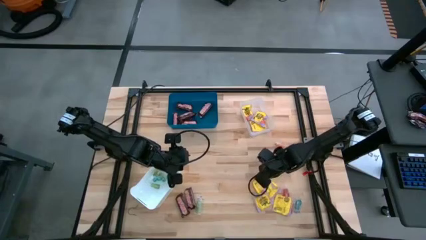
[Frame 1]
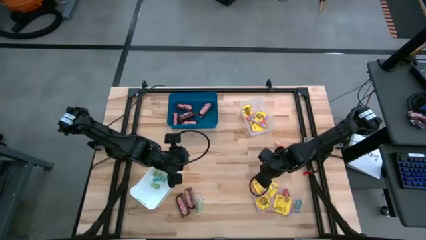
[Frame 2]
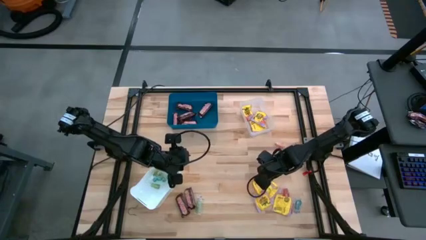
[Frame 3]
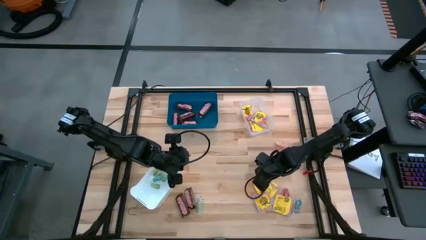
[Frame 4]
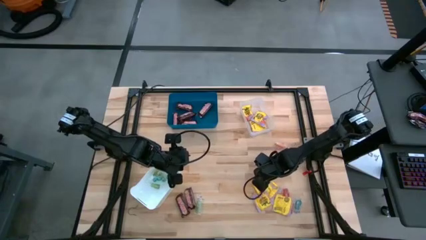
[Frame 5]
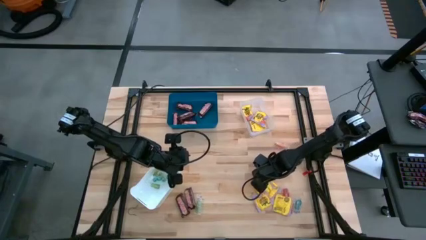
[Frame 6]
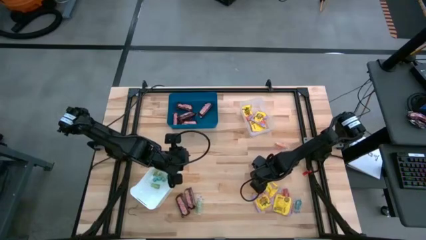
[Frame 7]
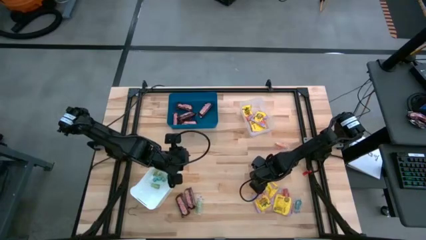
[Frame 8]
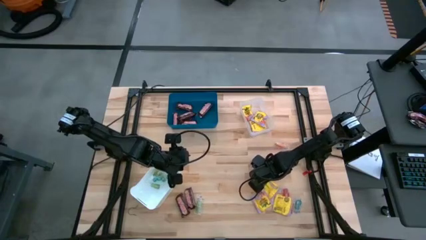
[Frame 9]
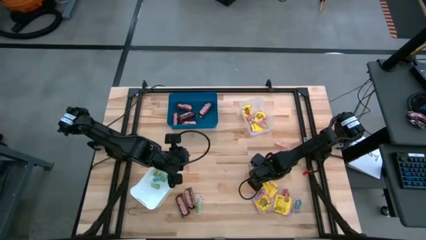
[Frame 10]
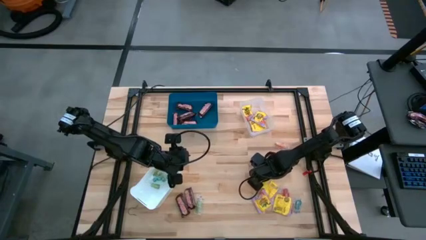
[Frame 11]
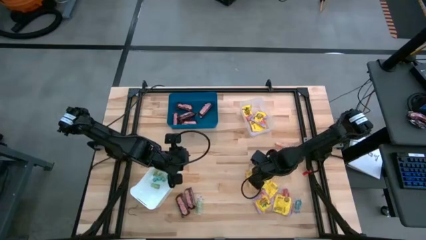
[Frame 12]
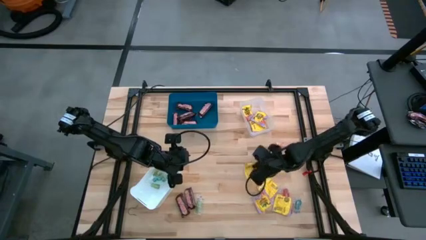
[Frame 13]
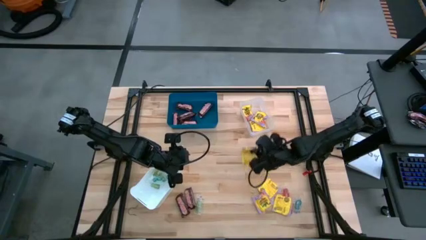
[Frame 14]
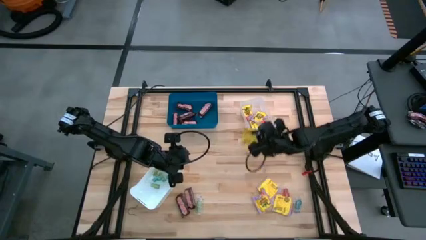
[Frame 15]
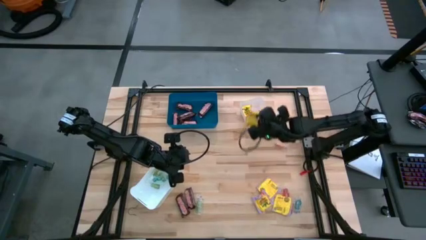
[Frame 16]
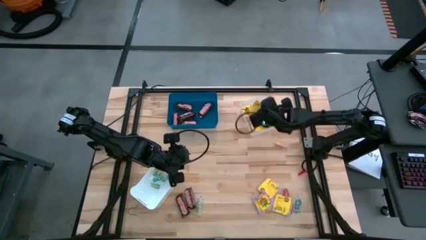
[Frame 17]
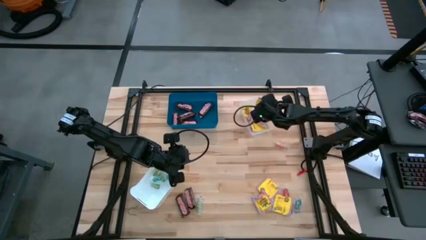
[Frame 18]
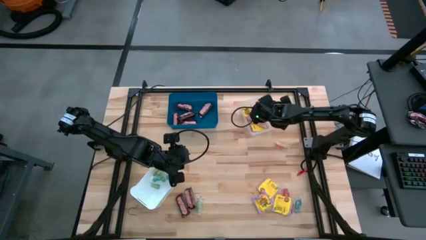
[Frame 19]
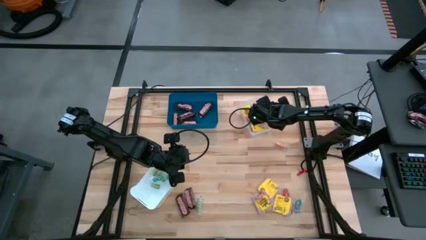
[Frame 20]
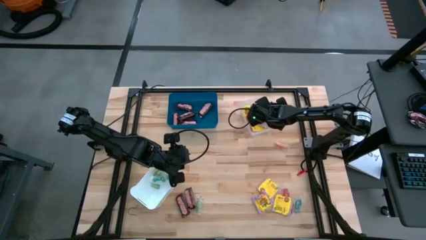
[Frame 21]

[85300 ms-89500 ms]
Task: Sort candy
Put the yellow candy into the transparent bin

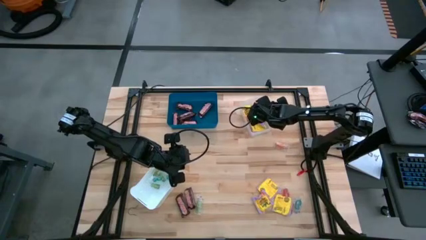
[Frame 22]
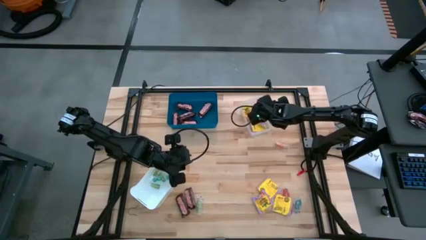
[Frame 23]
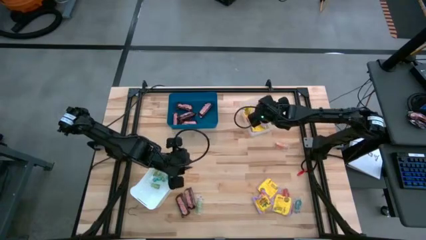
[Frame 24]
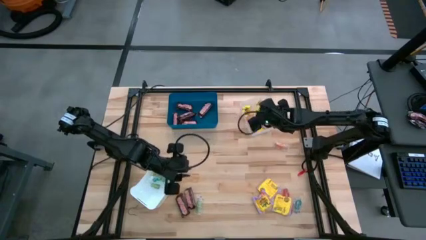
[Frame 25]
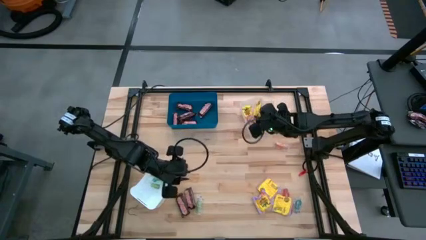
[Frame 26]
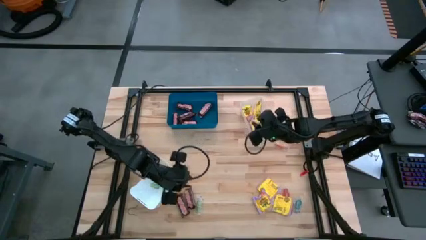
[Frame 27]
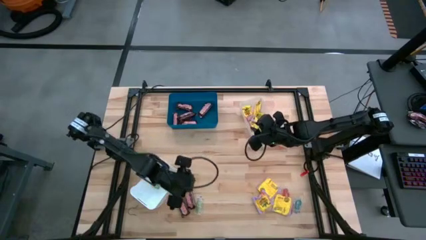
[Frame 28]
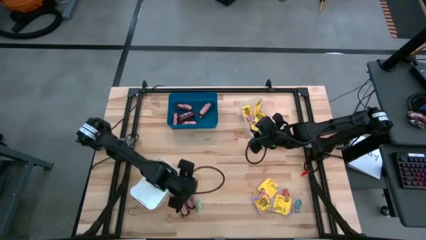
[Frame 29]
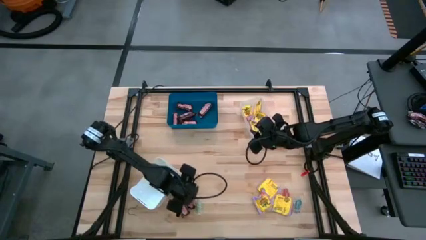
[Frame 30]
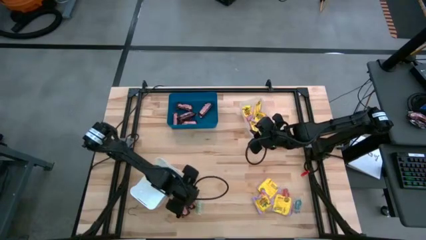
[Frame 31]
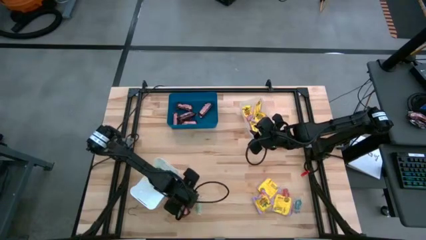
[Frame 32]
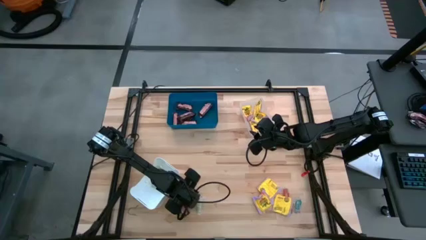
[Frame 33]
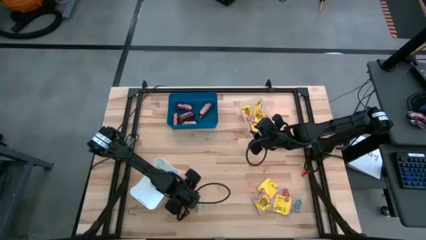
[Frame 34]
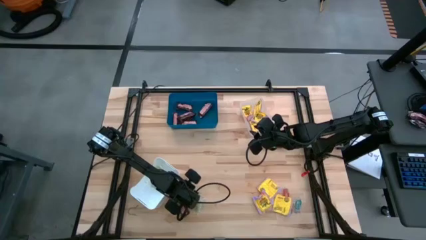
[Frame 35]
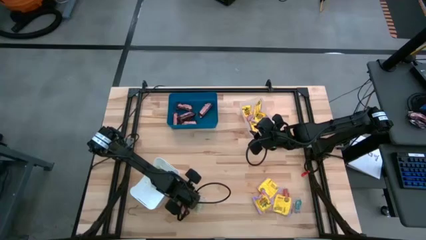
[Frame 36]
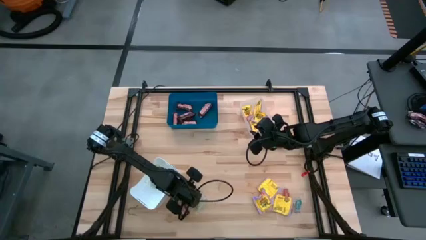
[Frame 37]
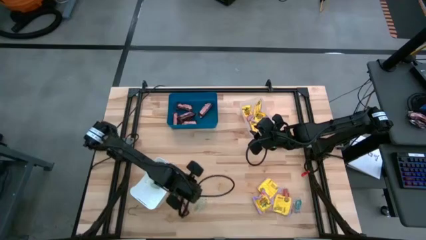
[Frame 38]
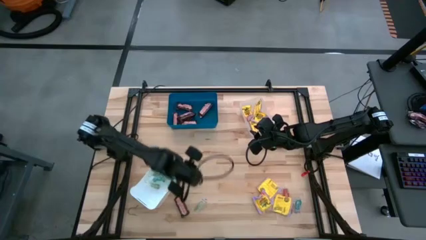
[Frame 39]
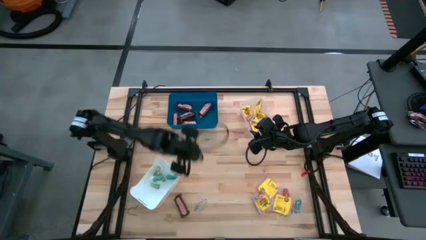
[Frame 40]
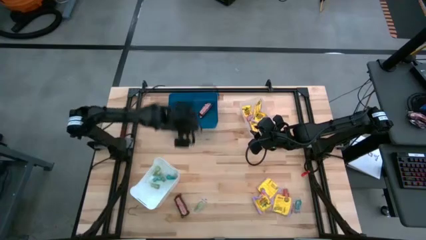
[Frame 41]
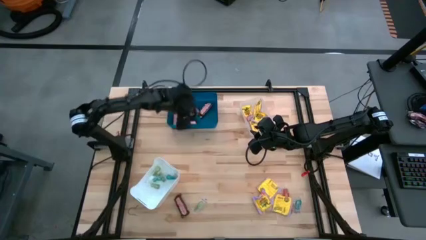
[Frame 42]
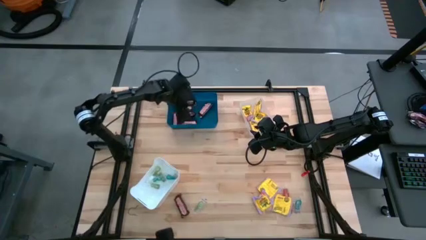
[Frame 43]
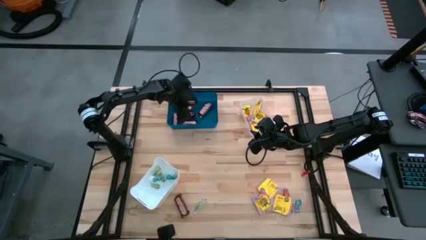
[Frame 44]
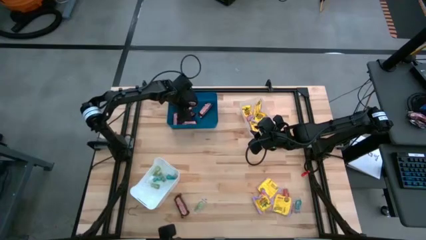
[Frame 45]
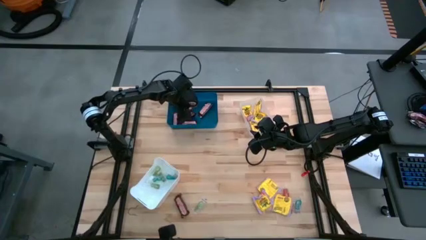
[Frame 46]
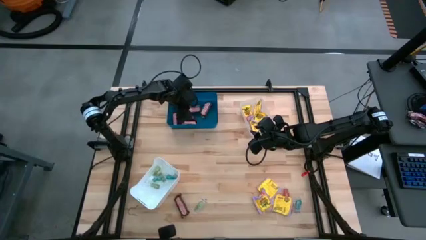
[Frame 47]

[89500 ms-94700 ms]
Put the brown chocolate into the blue bin

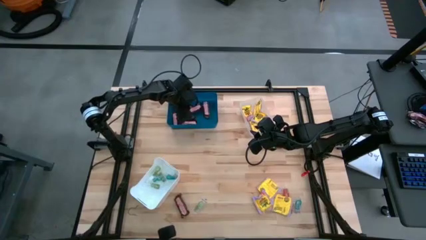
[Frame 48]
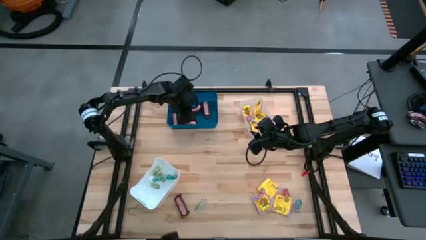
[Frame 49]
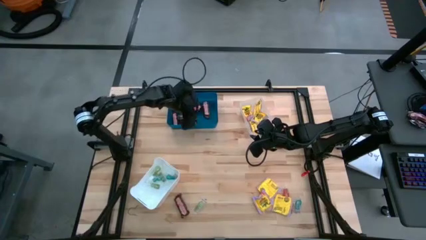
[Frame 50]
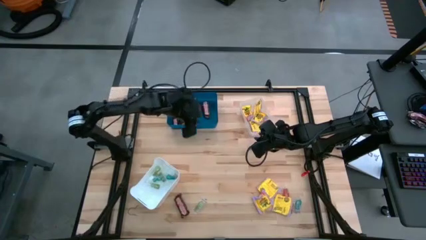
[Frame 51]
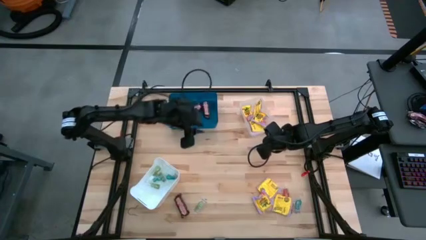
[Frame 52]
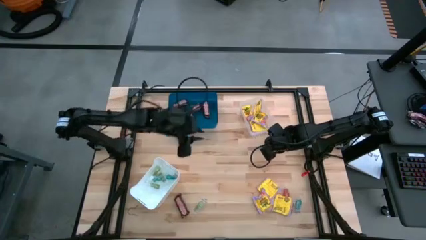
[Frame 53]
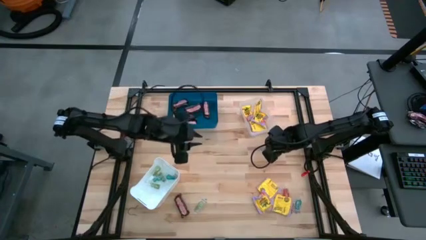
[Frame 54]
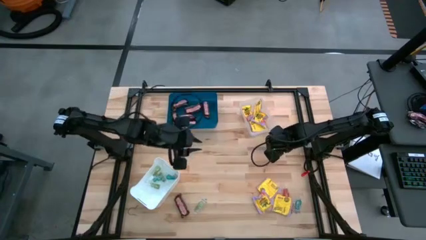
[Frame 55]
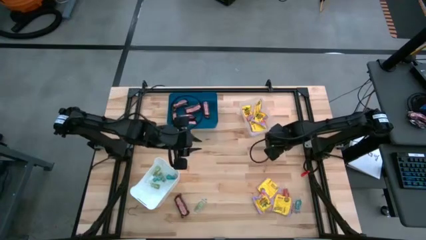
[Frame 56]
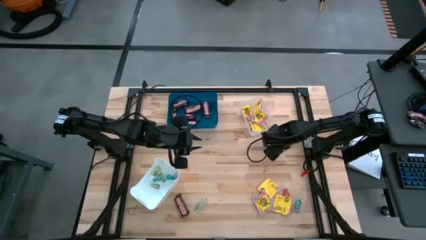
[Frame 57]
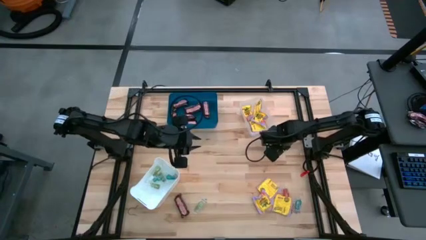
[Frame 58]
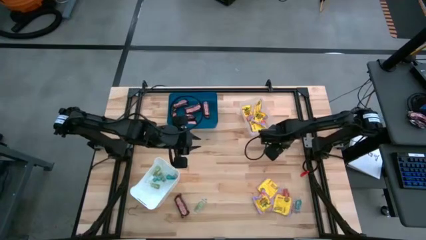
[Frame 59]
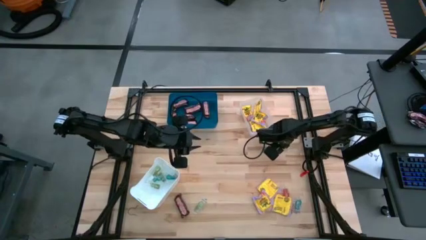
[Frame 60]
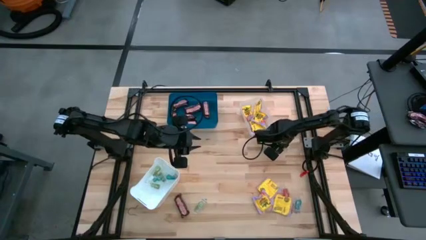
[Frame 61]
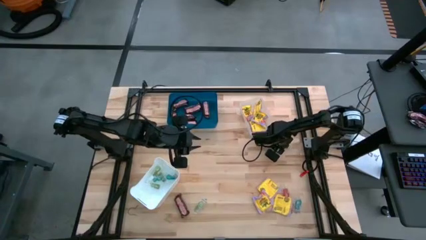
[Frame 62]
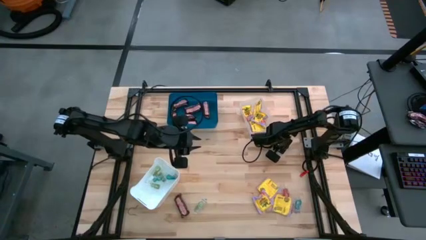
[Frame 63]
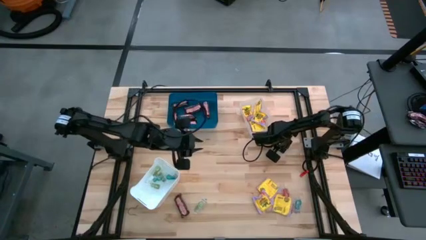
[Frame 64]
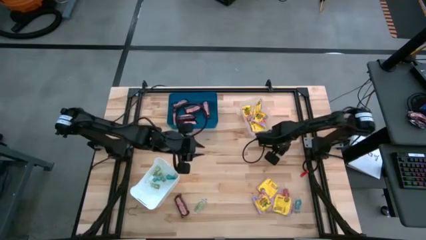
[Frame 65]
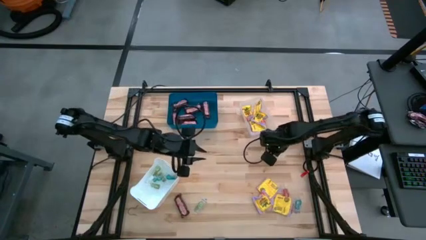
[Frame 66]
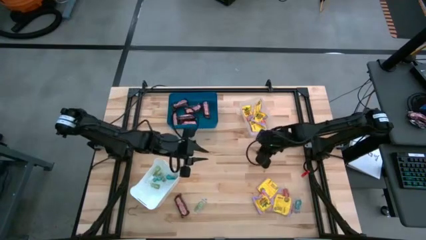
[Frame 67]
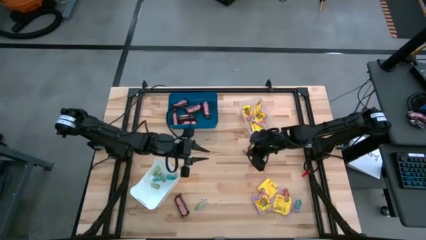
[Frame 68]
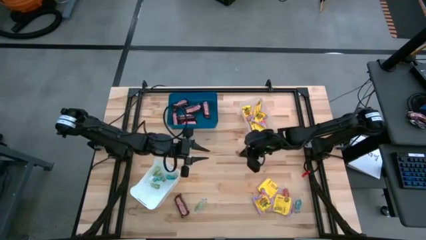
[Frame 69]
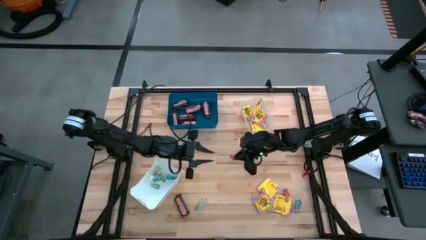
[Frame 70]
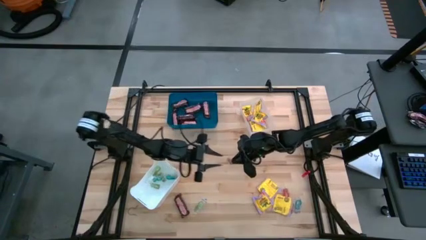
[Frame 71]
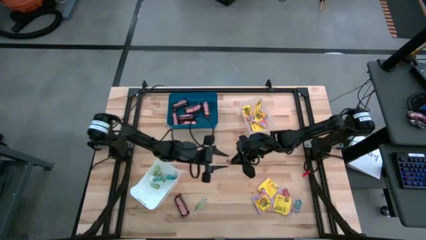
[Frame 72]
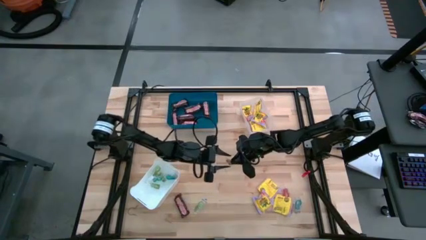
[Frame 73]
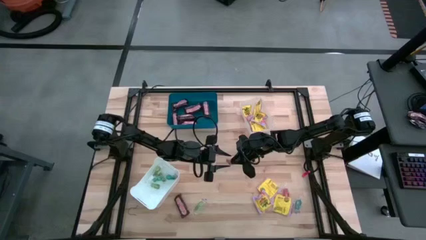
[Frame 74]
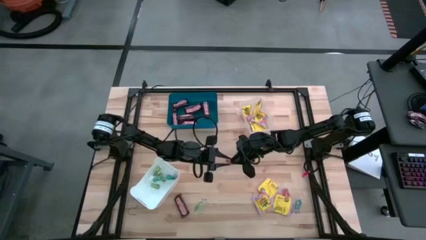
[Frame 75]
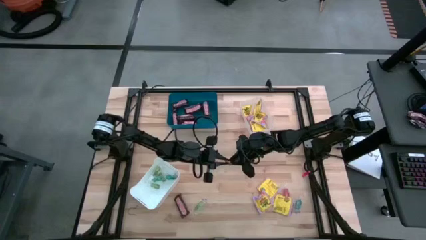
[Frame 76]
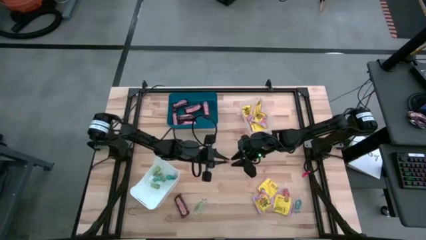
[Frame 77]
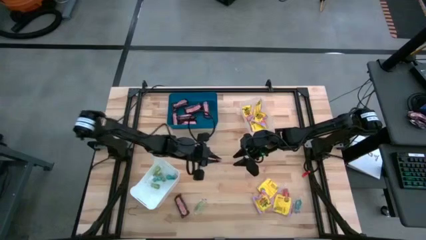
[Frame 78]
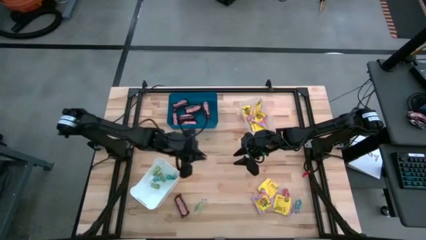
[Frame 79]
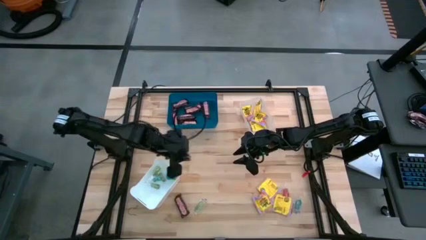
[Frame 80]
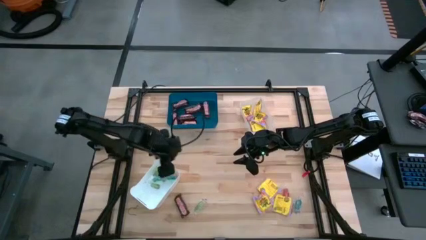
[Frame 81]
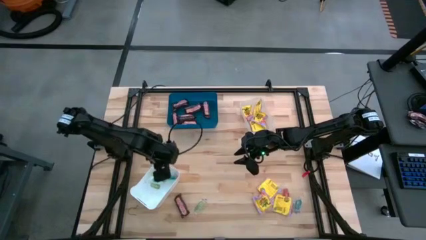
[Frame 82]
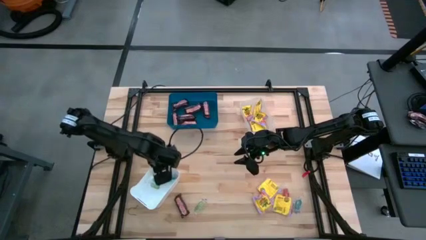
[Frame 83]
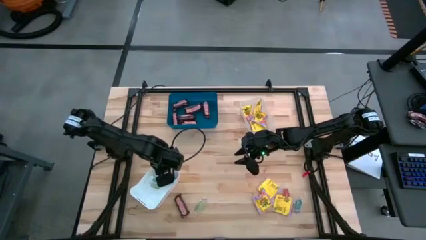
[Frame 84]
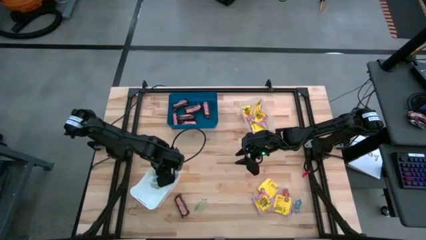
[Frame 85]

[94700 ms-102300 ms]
Put the orange gummy into the white bin
